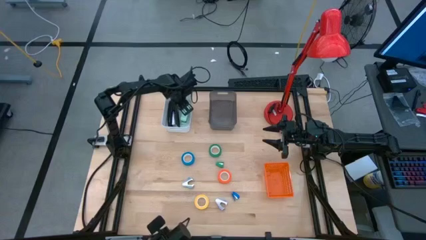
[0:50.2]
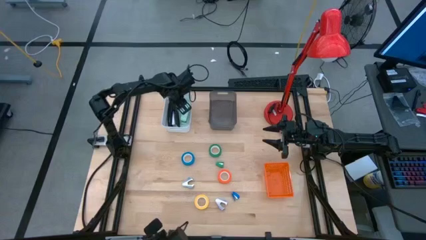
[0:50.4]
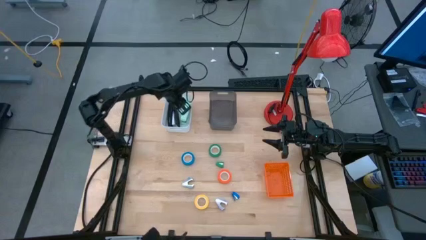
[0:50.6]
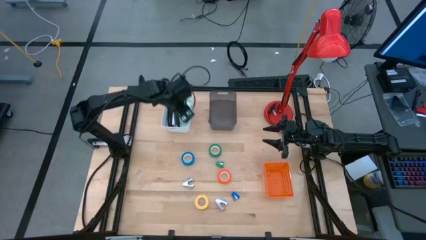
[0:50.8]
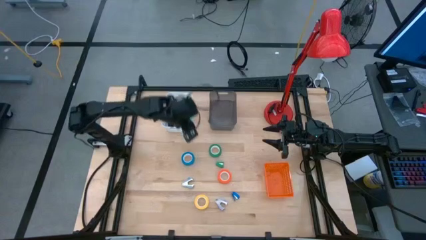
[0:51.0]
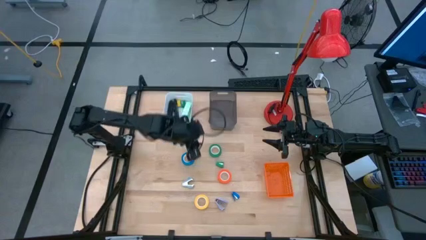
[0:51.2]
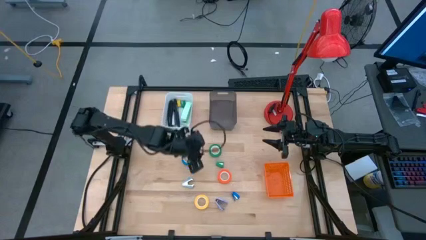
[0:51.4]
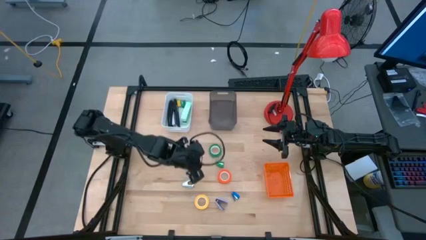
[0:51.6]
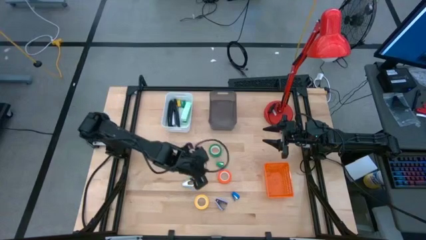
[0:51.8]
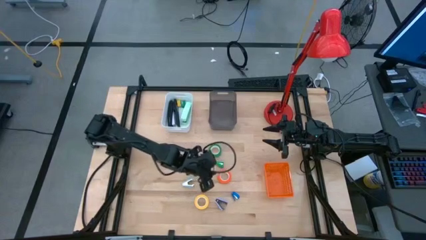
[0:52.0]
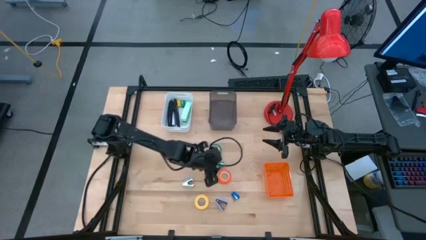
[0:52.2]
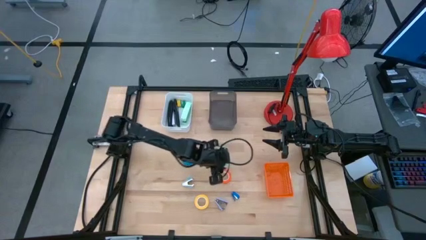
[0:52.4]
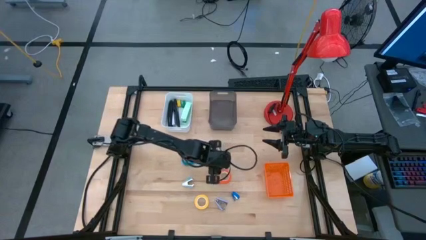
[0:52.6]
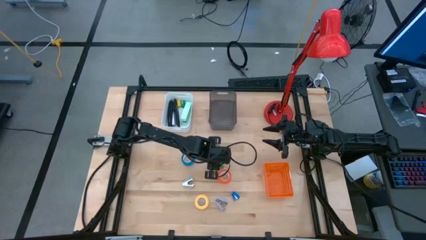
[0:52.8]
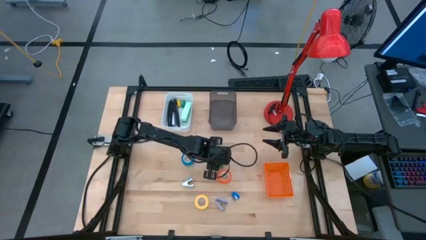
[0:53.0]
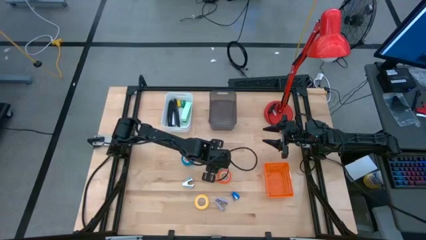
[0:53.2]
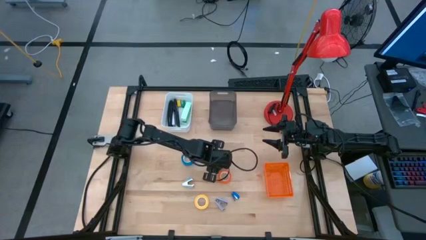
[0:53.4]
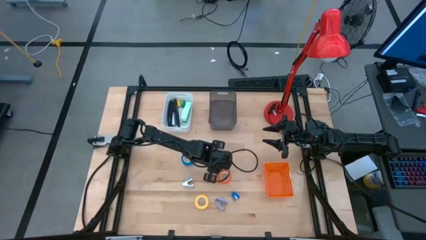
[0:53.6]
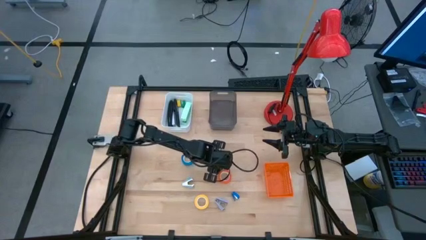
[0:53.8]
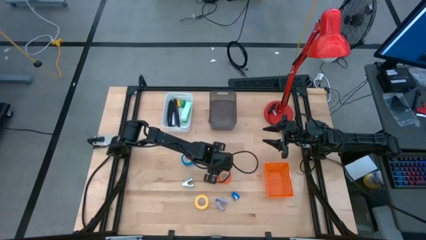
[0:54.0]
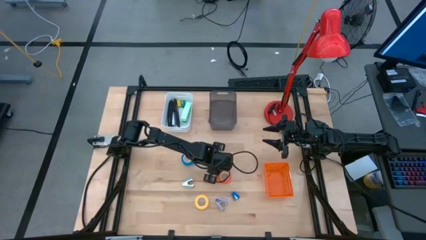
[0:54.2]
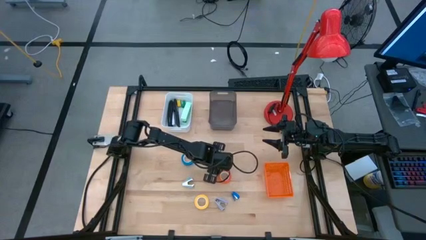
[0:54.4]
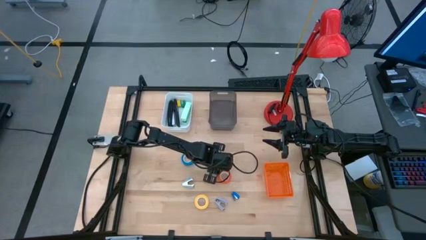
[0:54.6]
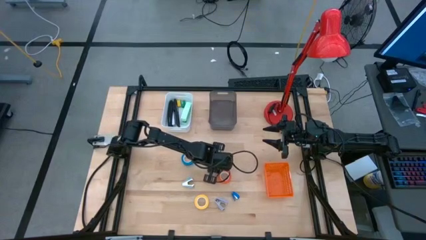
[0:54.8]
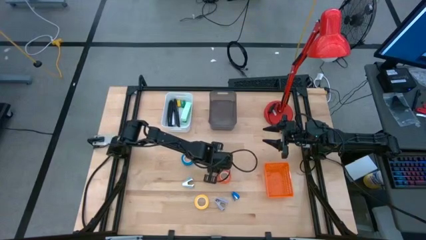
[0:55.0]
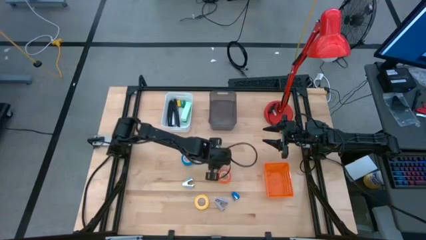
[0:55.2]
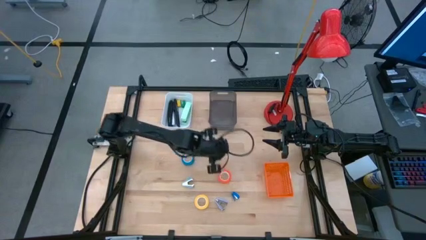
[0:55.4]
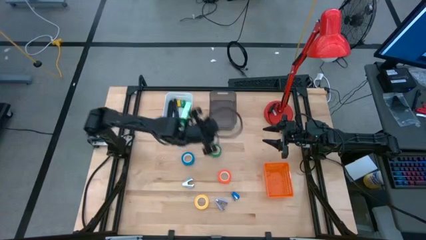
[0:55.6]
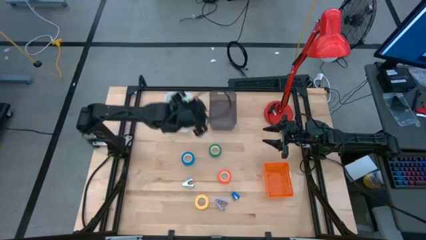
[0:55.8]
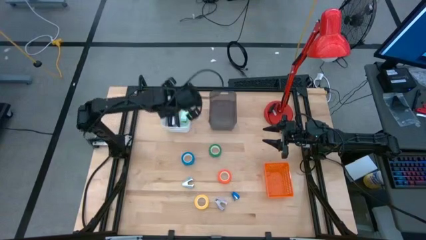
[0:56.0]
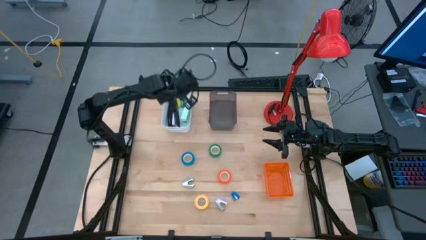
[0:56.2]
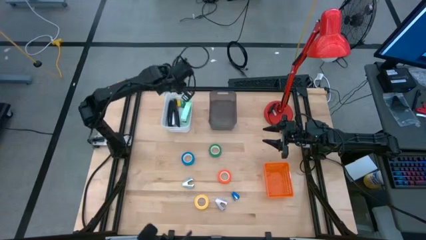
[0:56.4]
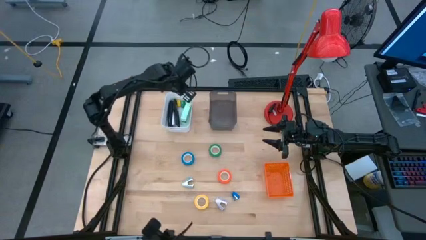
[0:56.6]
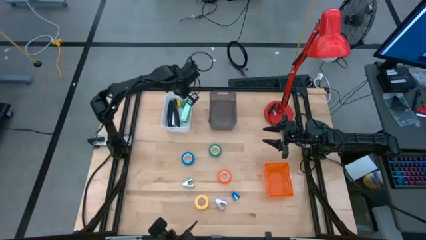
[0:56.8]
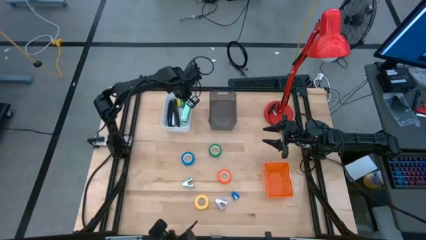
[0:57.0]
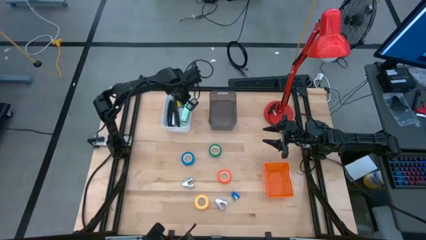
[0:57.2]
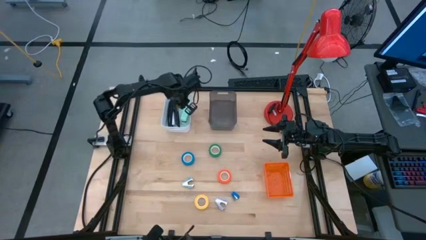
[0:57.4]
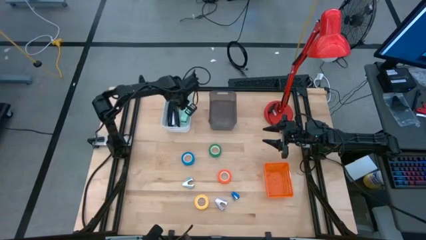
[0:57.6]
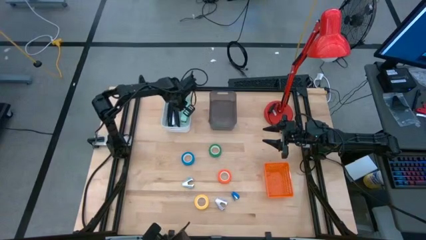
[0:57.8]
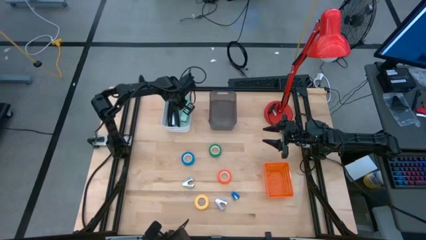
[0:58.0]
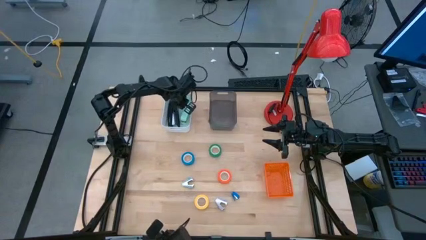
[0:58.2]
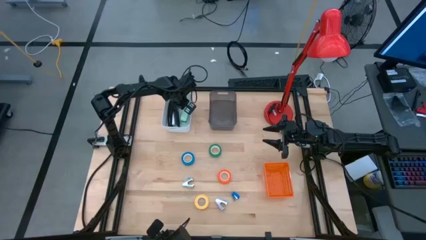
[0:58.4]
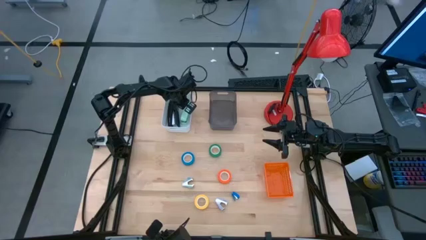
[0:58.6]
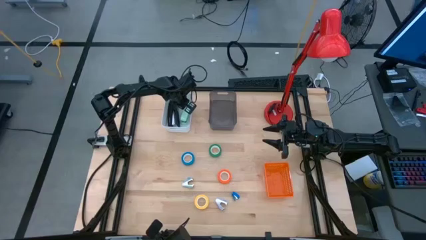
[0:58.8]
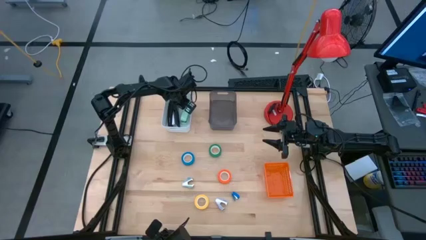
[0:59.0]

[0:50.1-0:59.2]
Task: Pick and place Stapler, Stapler remover, tape
Put the green stapler into the white bin
